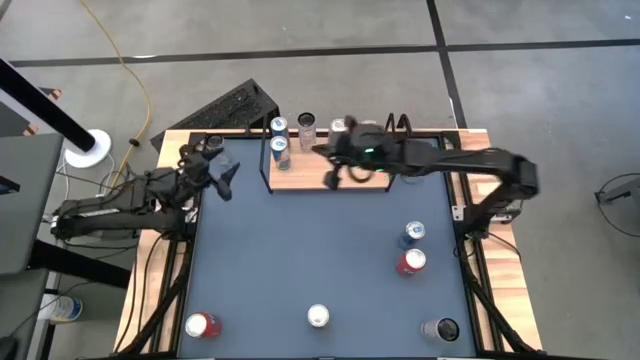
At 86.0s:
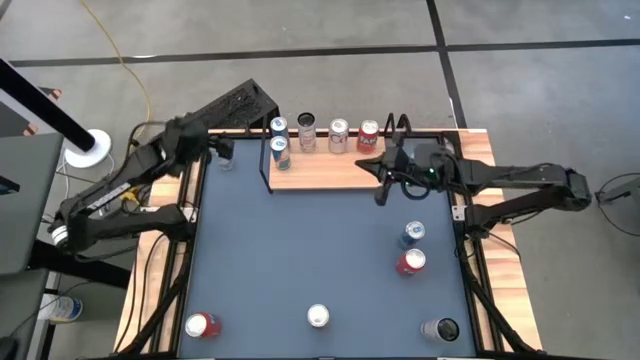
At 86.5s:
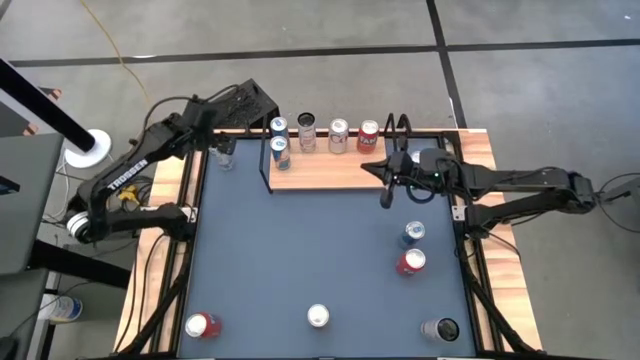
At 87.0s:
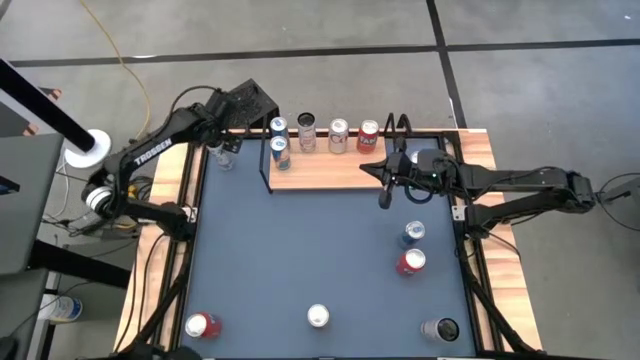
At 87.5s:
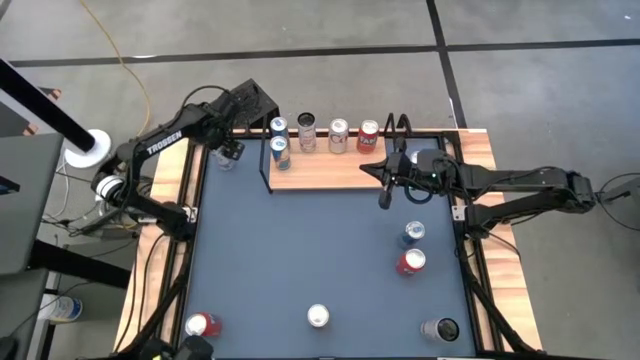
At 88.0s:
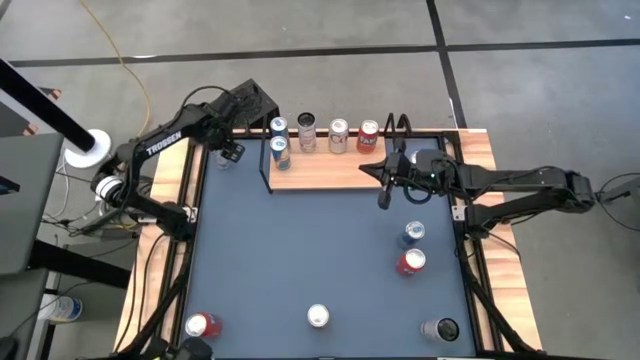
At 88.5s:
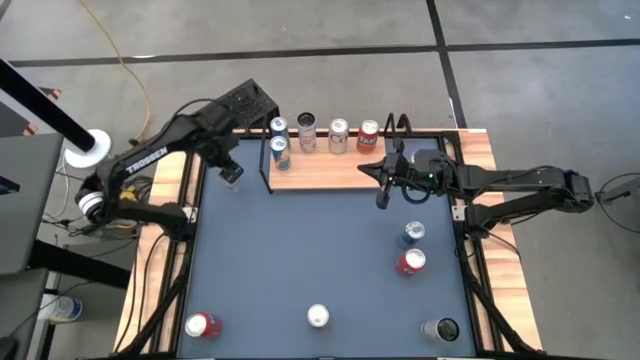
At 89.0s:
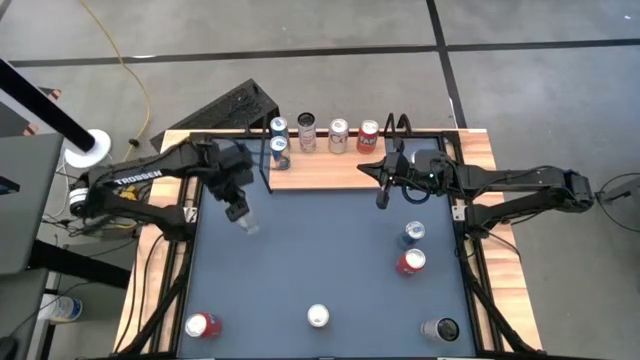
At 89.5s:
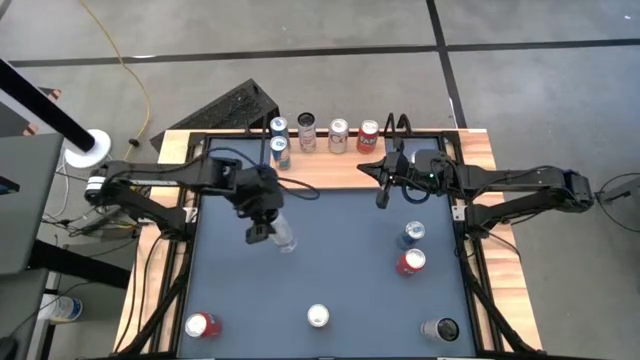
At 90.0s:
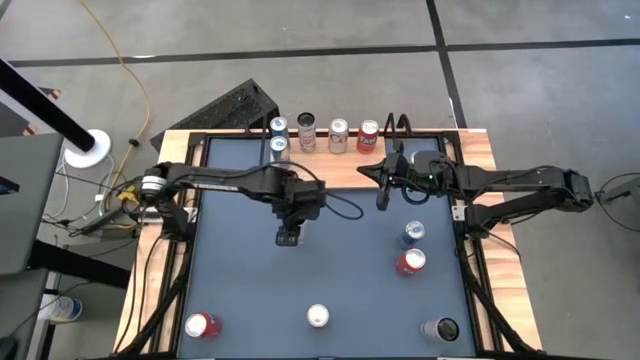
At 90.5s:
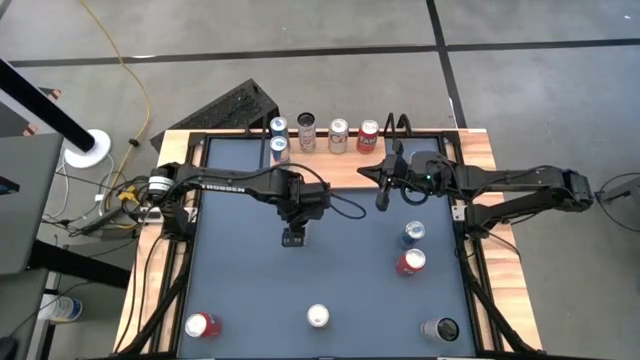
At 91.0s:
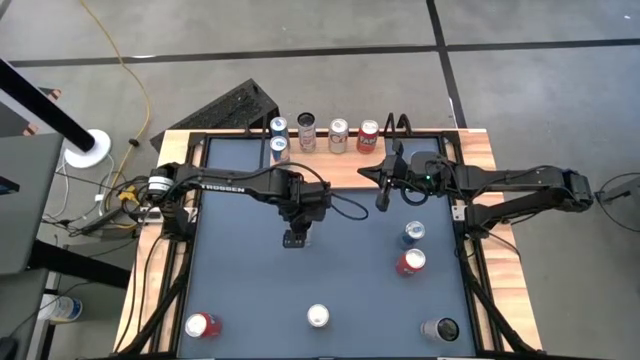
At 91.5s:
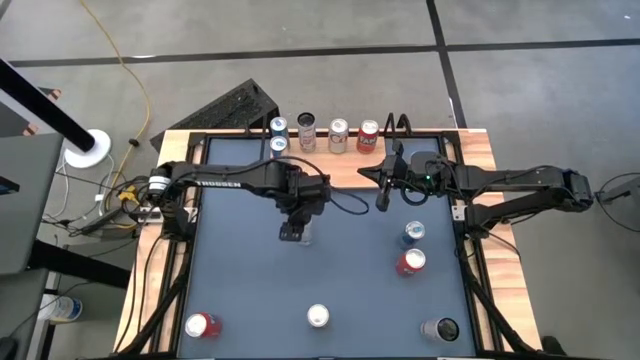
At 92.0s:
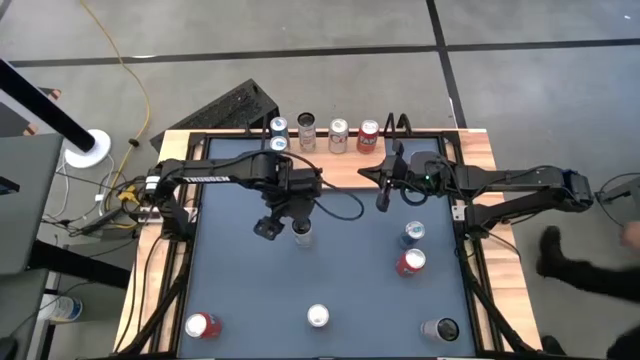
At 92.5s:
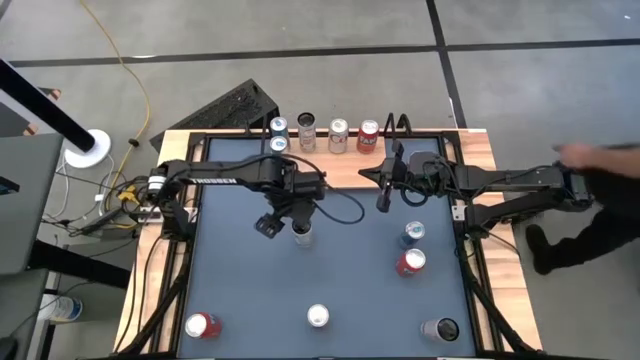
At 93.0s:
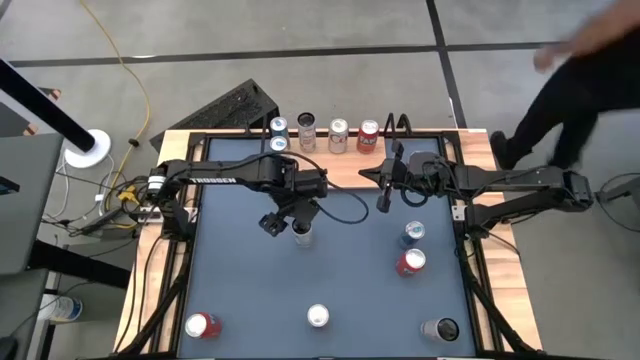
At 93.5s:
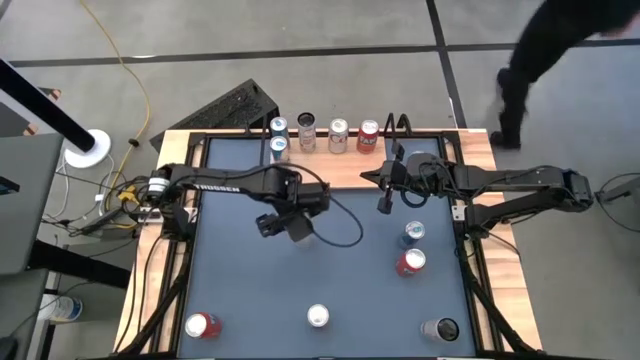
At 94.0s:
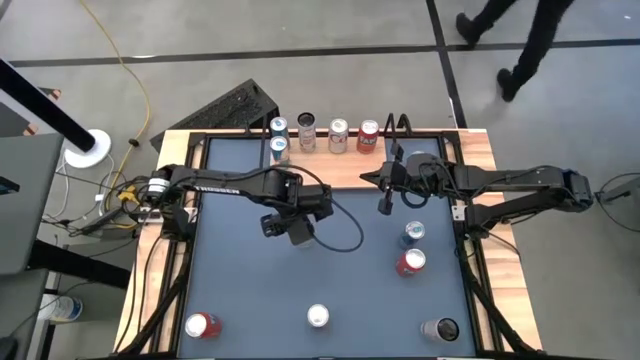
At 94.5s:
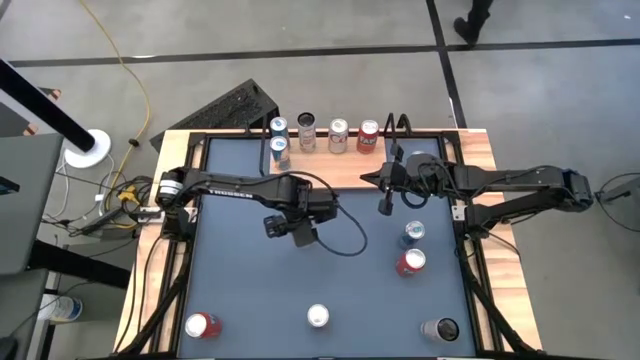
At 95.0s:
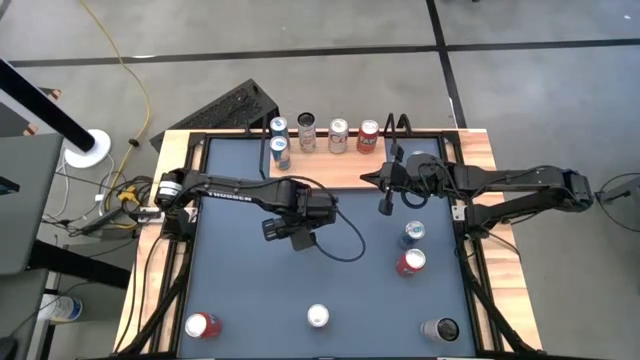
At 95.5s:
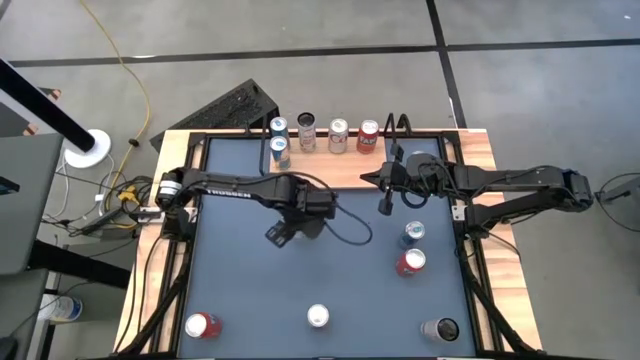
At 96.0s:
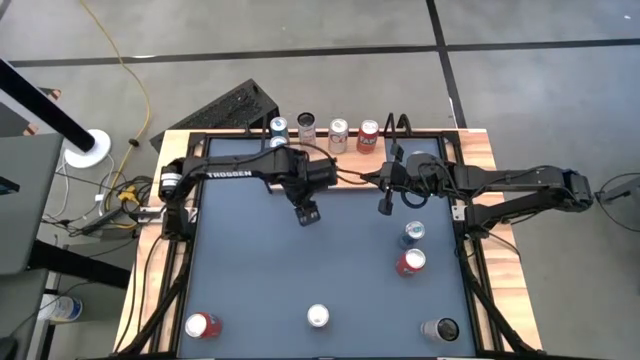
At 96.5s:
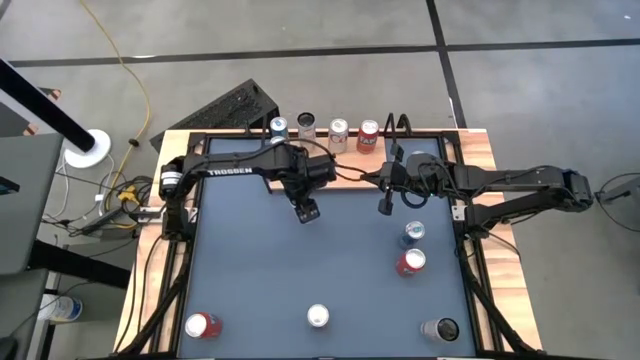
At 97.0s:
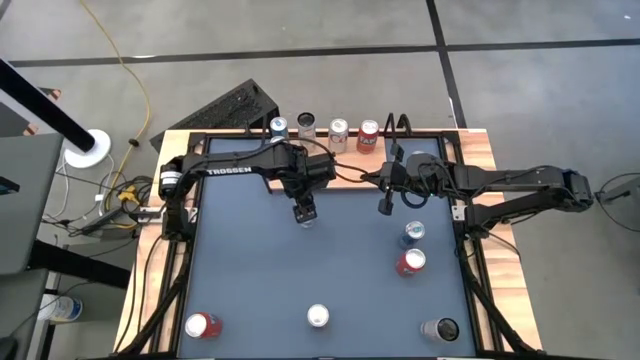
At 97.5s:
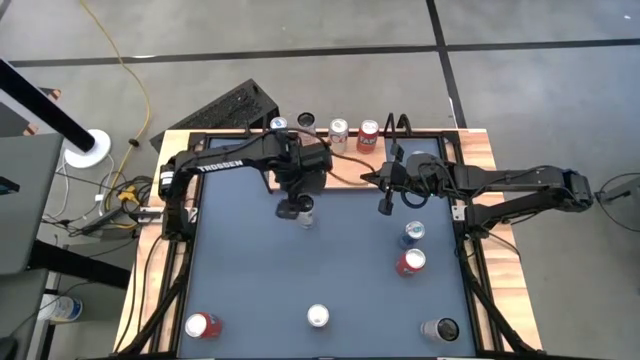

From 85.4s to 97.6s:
Task: Place canned beverage on shelf
Put the top pink and white soda can onto the shelf aligned with the other pink and white soda can

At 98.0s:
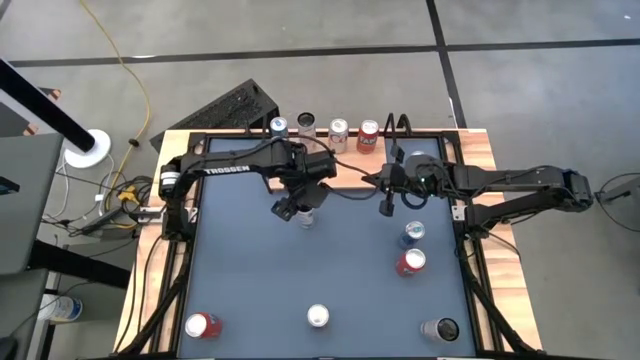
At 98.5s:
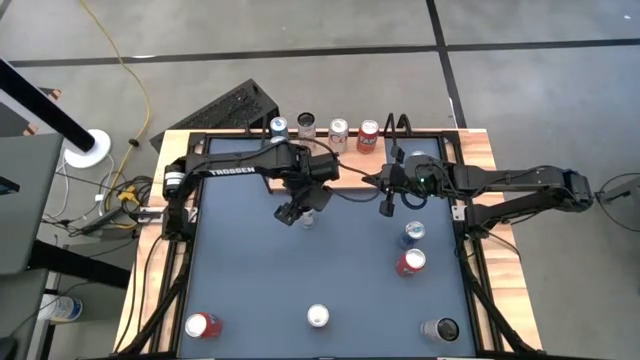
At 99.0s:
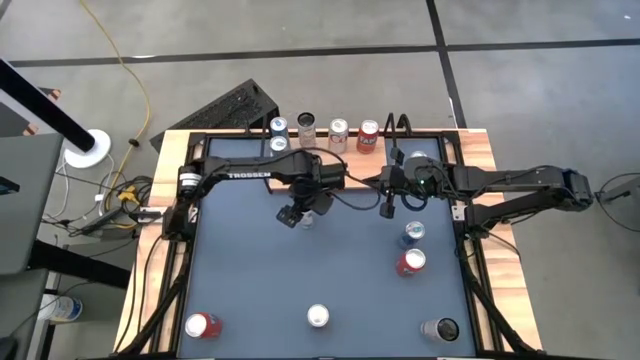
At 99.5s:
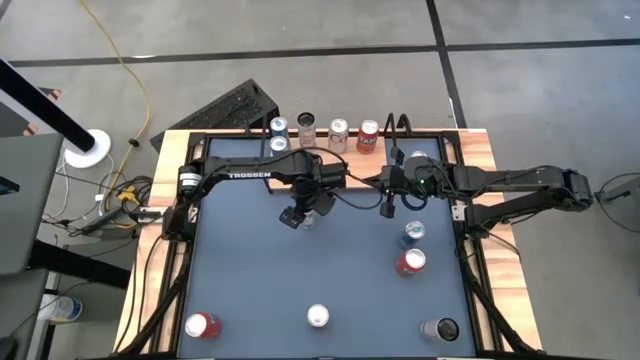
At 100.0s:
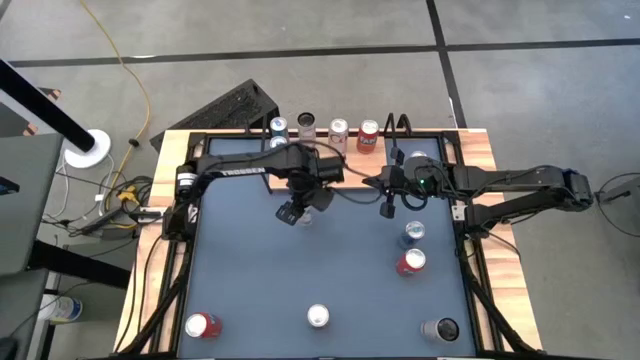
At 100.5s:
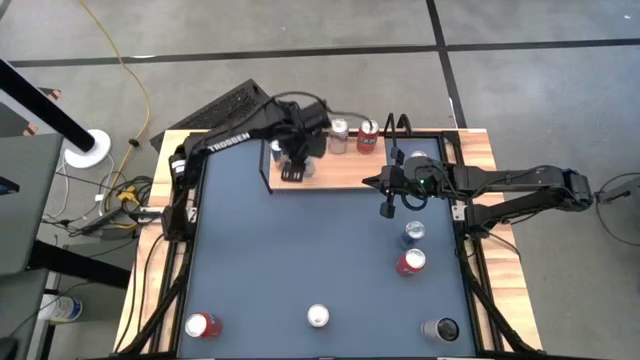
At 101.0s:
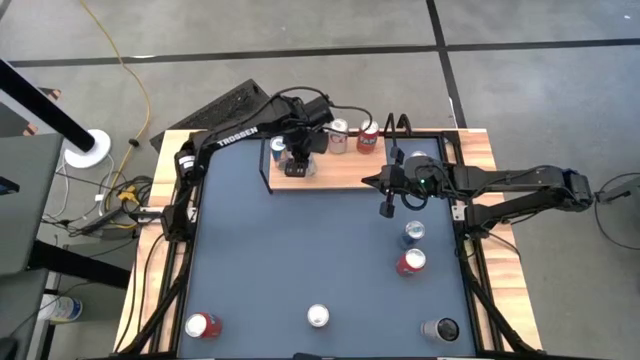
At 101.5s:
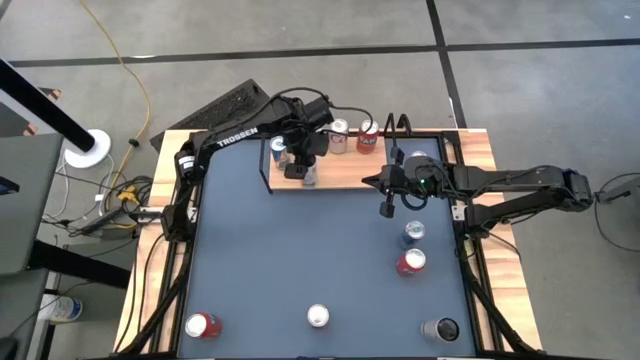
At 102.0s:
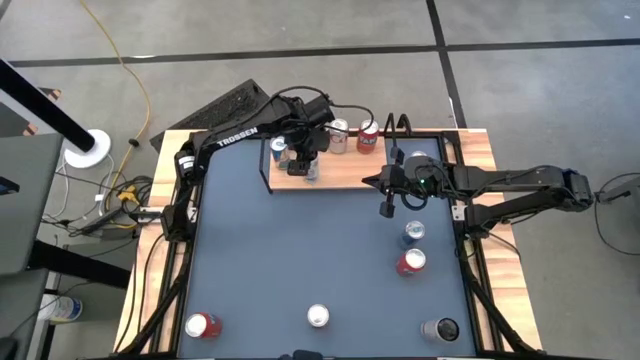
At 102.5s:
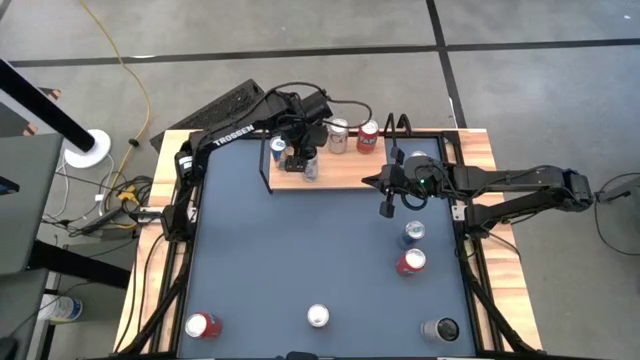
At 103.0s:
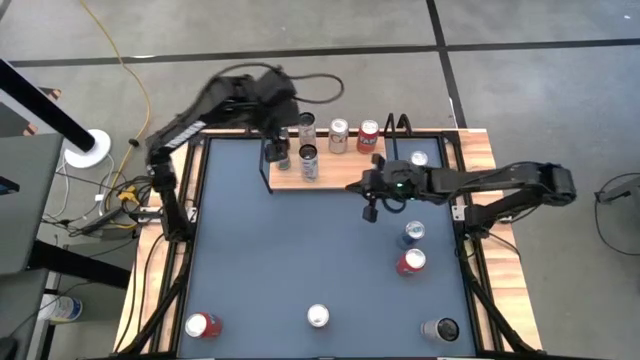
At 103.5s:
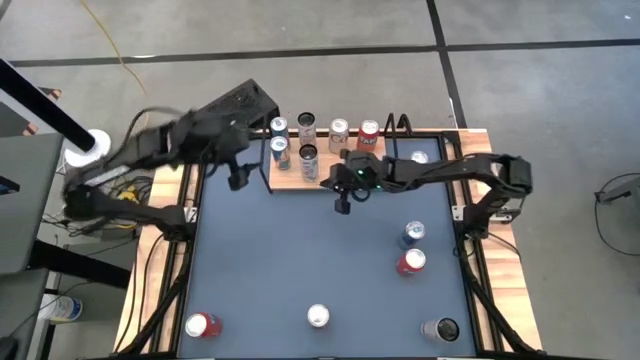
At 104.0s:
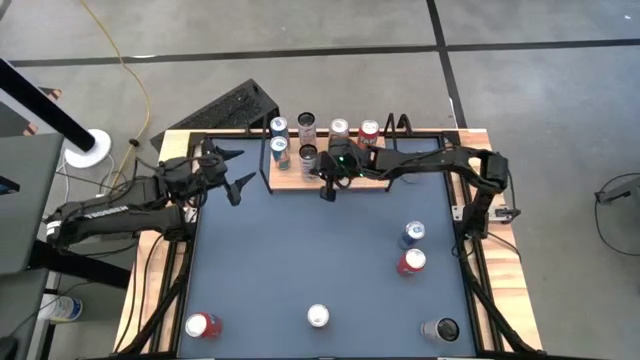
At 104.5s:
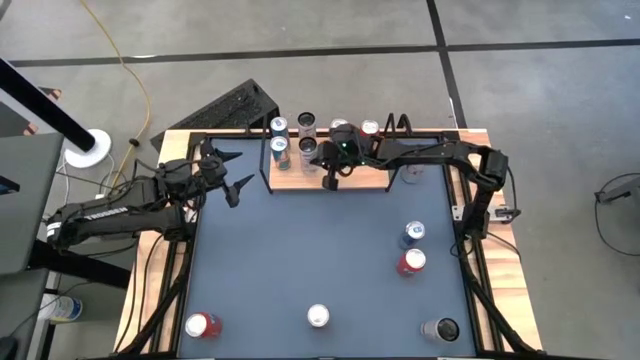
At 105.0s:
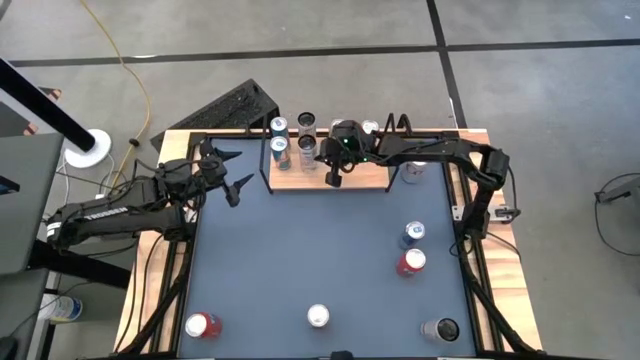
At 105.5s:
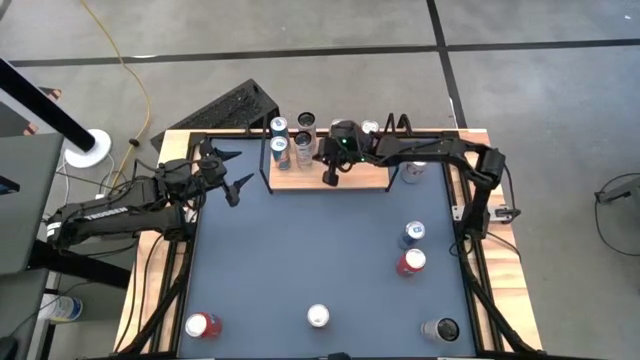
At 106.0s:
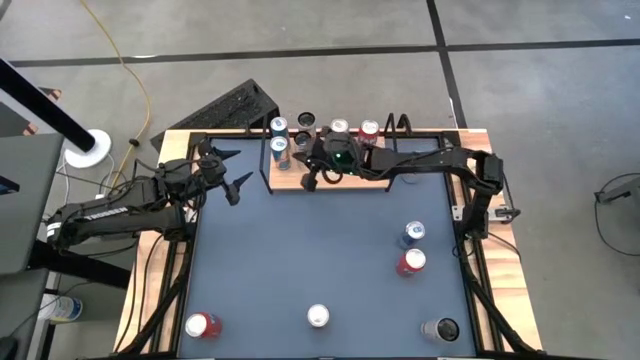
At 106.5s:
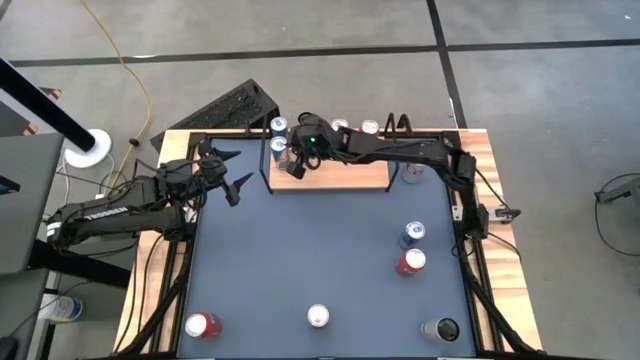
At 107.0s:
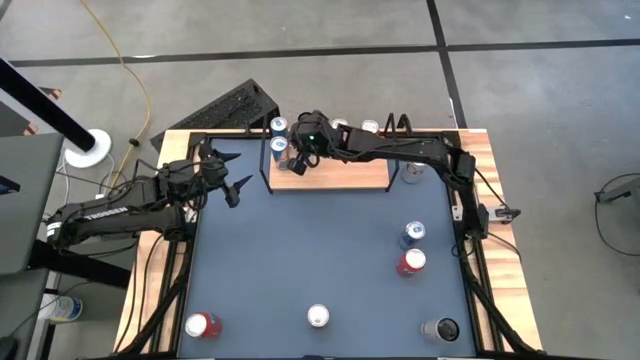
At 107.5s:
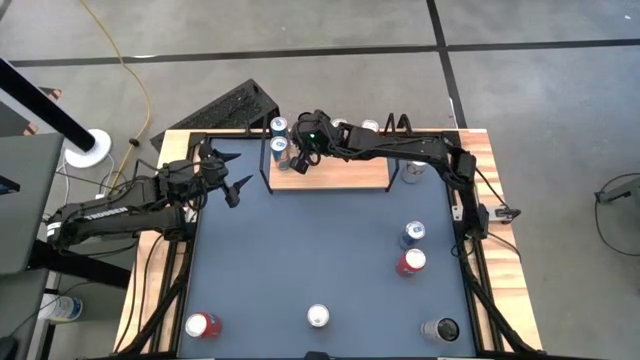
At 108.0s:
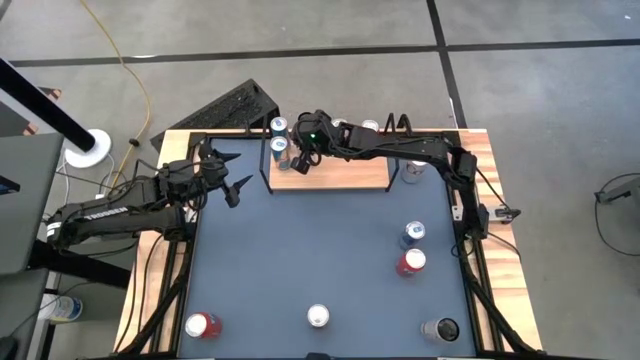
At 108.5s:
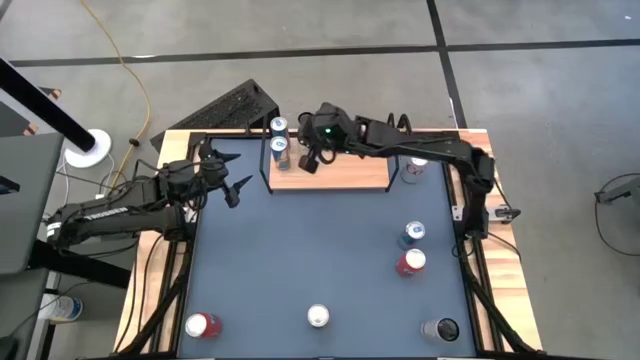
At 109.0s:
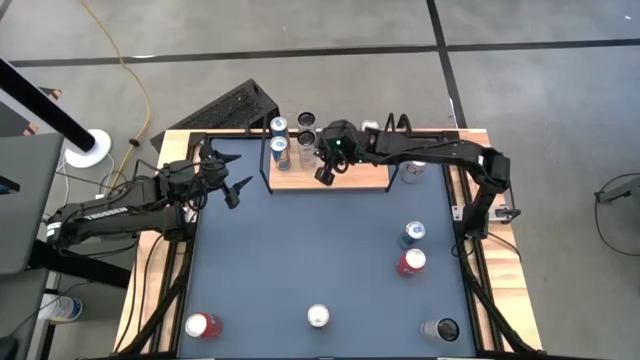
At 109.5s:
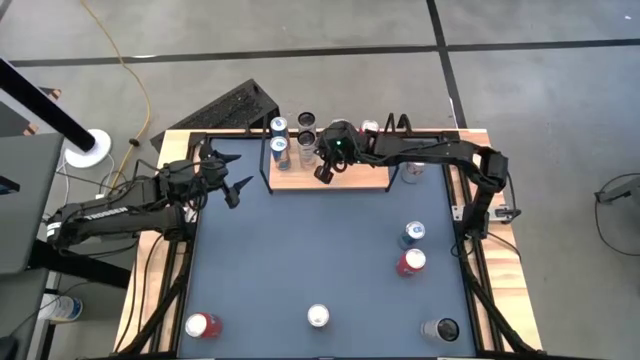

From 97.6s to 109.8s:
Put the top pink and white soda can onto the shelf aligned with the other pink and white soda can
